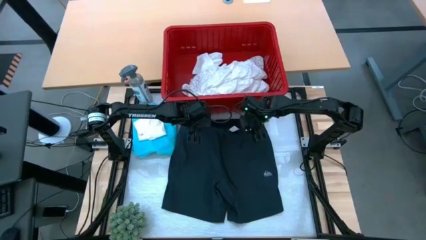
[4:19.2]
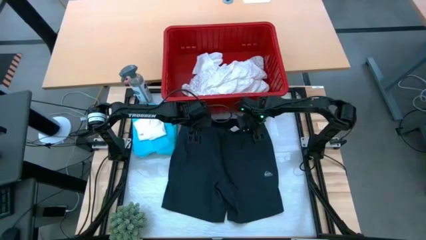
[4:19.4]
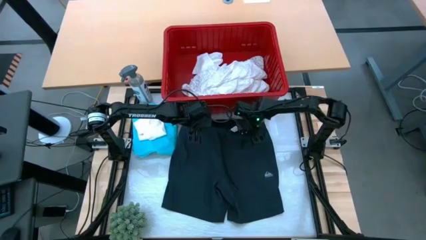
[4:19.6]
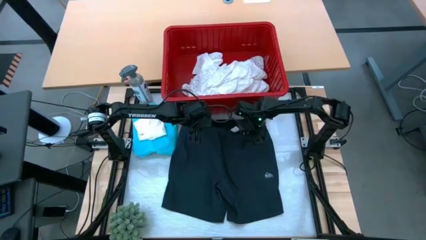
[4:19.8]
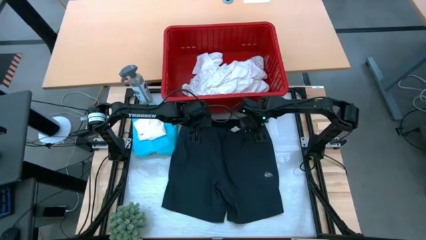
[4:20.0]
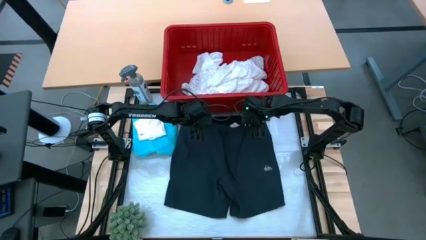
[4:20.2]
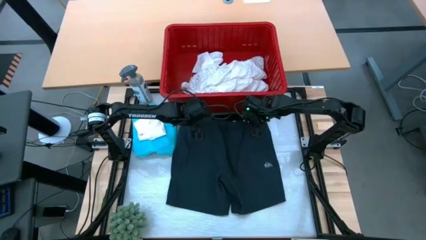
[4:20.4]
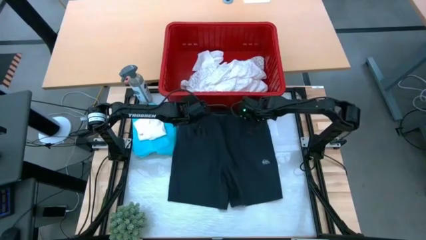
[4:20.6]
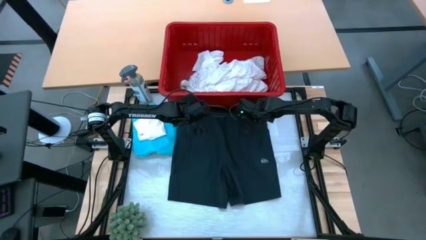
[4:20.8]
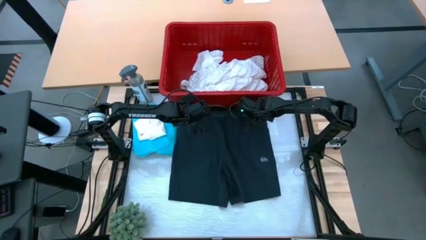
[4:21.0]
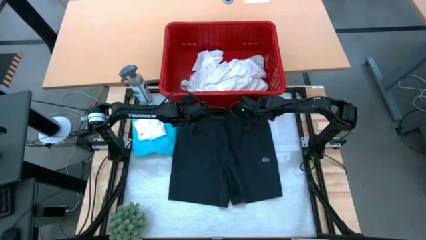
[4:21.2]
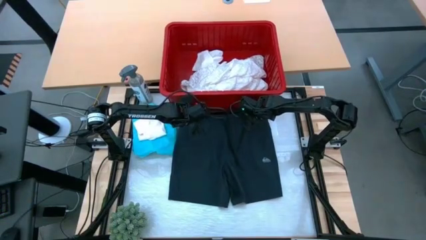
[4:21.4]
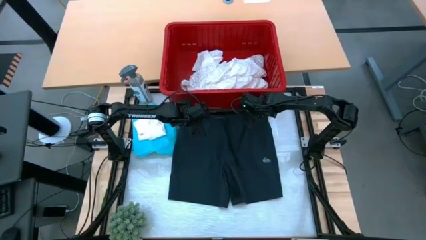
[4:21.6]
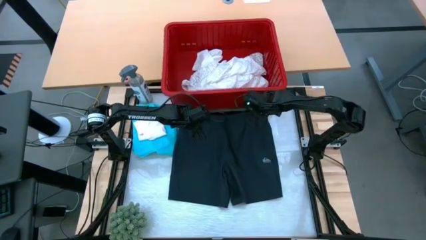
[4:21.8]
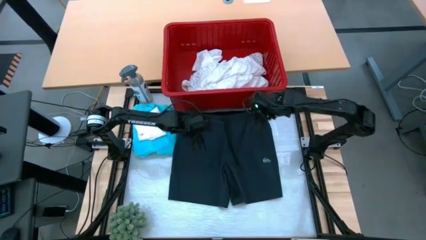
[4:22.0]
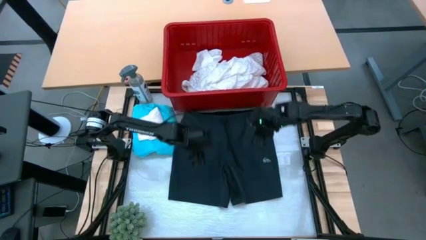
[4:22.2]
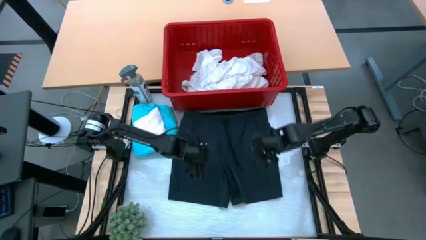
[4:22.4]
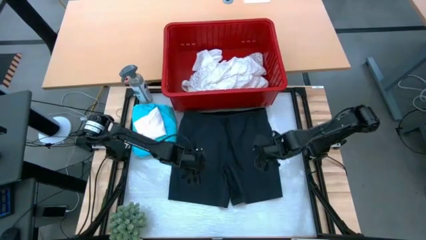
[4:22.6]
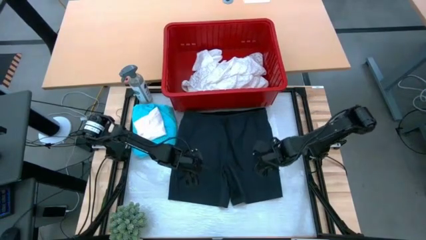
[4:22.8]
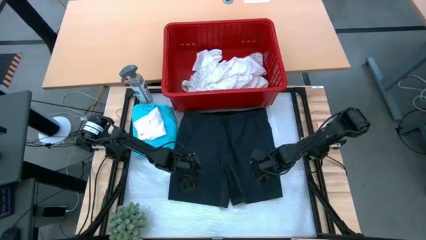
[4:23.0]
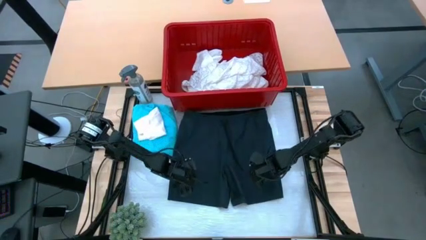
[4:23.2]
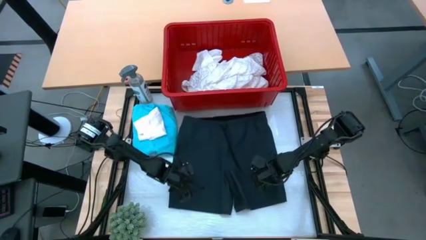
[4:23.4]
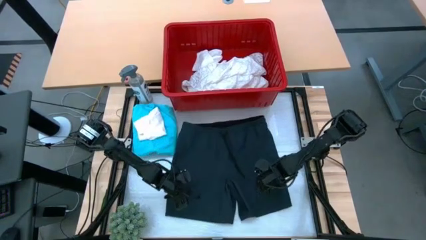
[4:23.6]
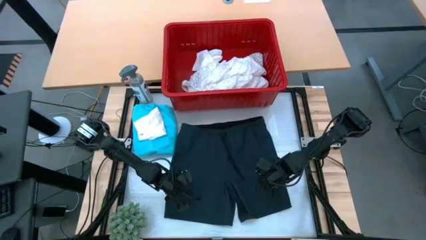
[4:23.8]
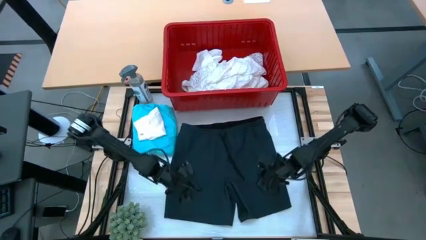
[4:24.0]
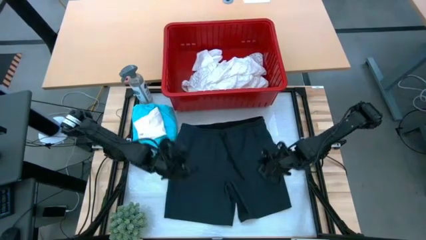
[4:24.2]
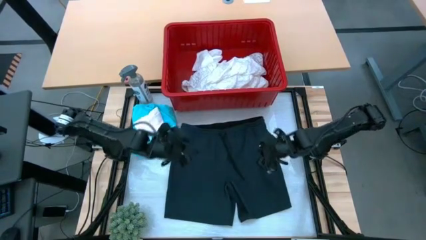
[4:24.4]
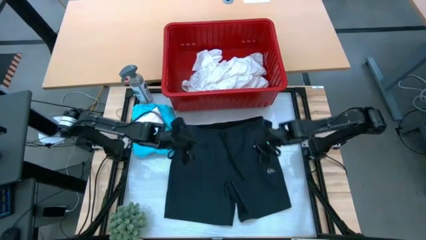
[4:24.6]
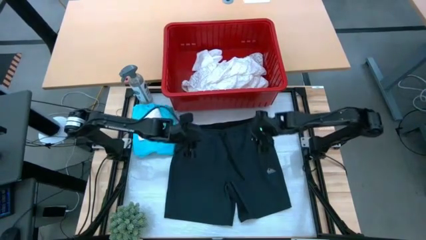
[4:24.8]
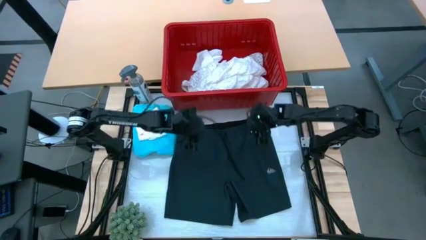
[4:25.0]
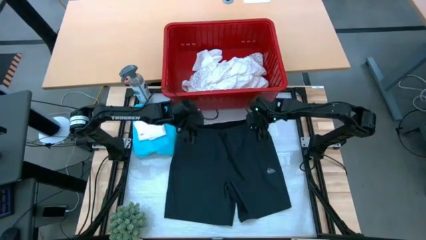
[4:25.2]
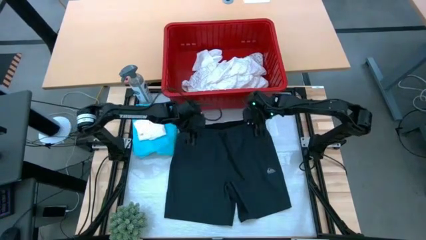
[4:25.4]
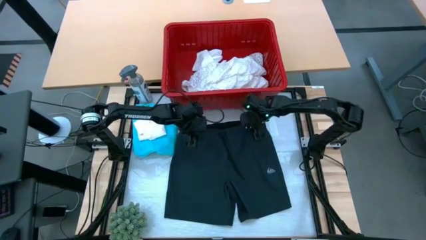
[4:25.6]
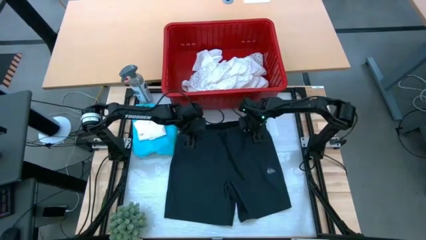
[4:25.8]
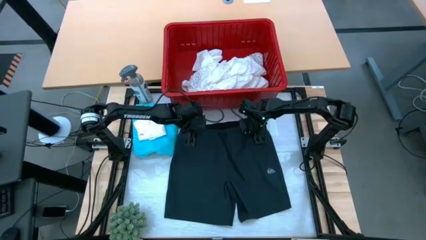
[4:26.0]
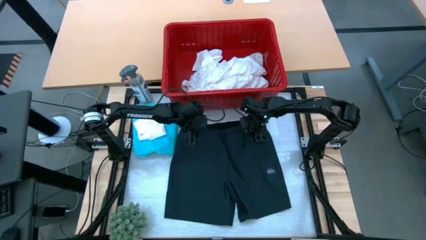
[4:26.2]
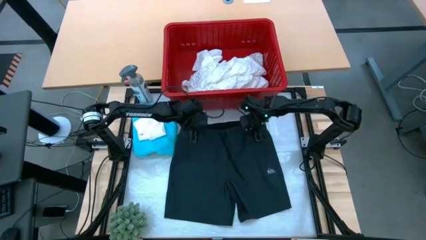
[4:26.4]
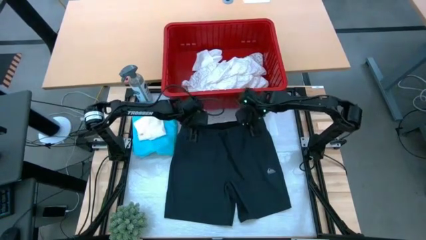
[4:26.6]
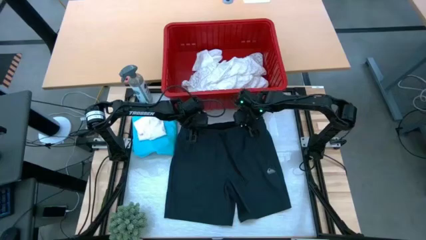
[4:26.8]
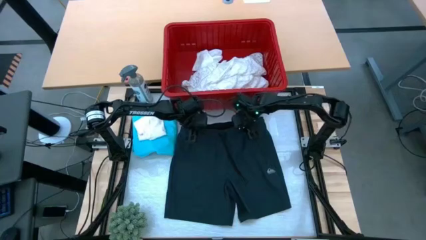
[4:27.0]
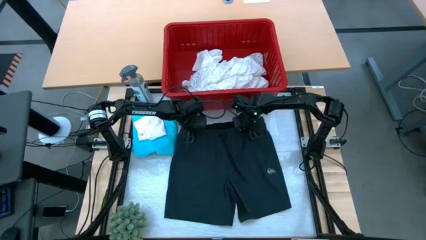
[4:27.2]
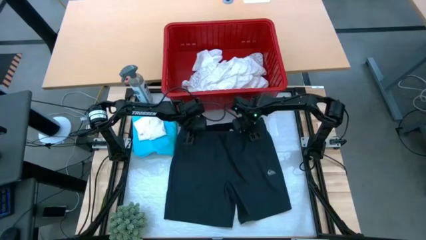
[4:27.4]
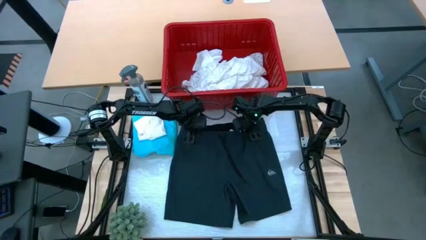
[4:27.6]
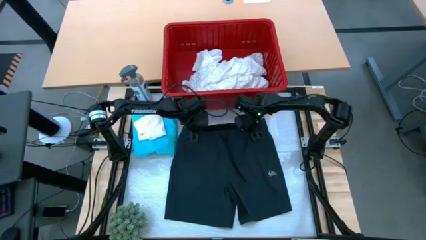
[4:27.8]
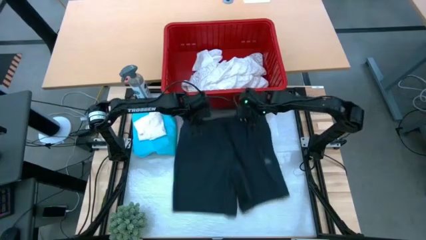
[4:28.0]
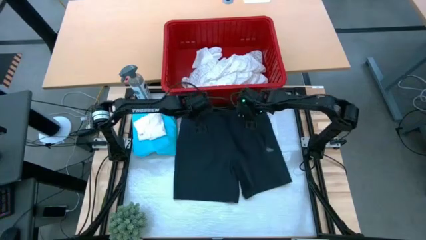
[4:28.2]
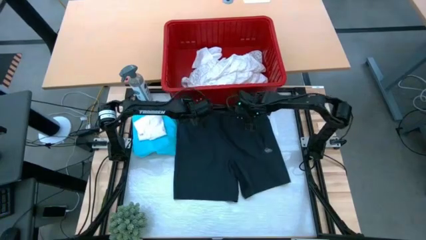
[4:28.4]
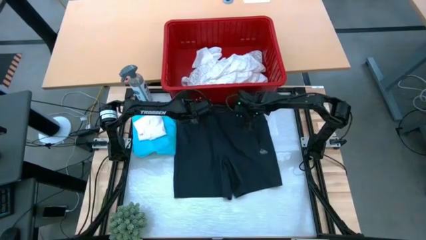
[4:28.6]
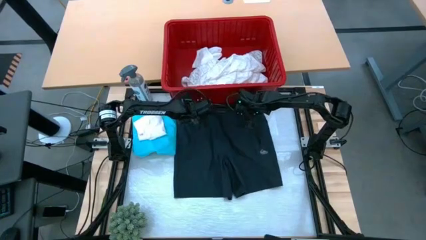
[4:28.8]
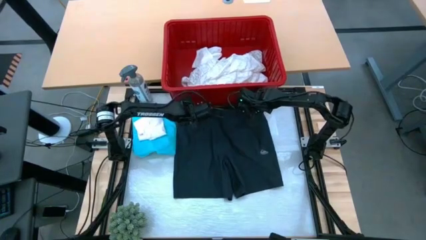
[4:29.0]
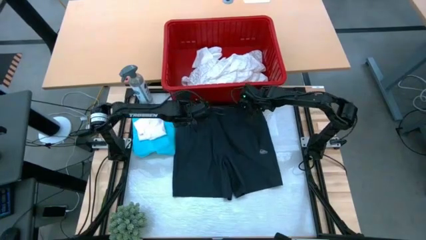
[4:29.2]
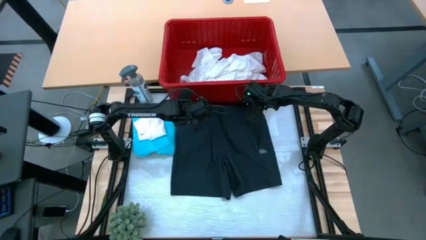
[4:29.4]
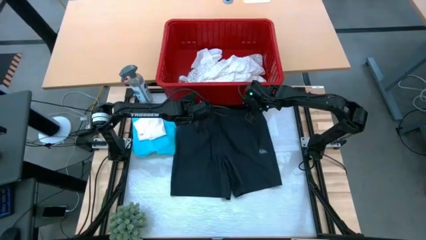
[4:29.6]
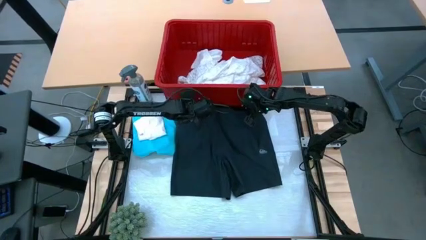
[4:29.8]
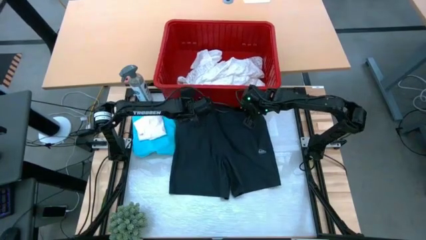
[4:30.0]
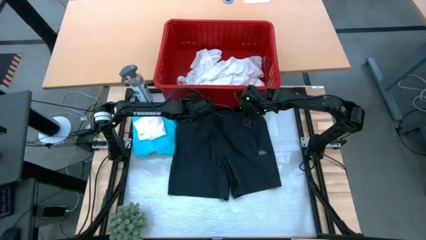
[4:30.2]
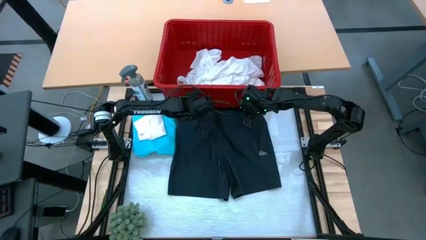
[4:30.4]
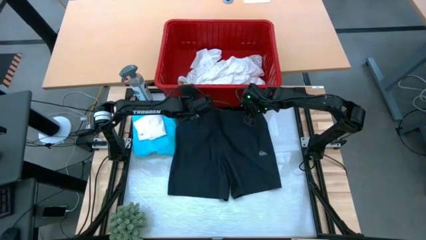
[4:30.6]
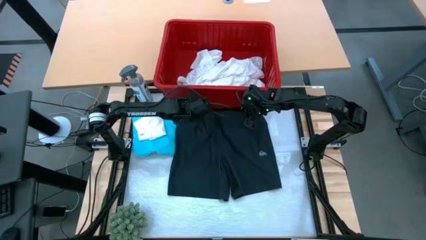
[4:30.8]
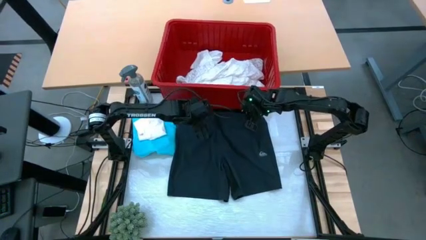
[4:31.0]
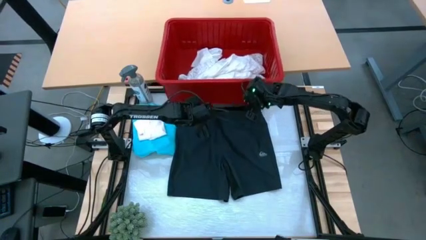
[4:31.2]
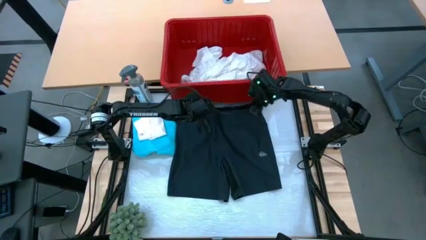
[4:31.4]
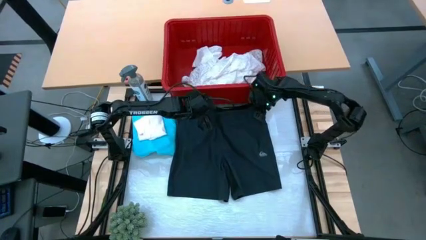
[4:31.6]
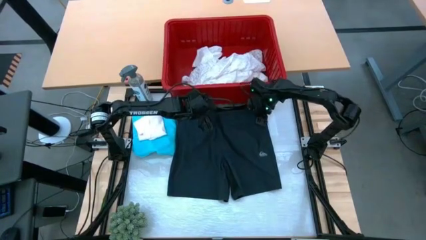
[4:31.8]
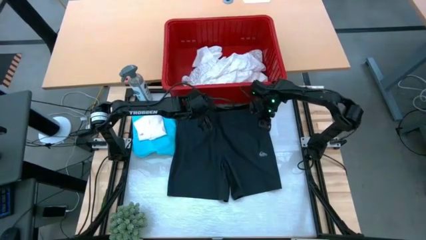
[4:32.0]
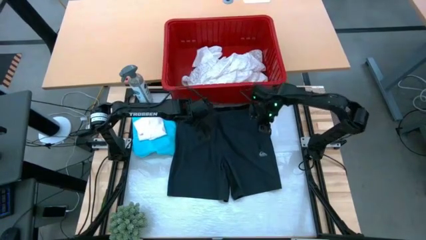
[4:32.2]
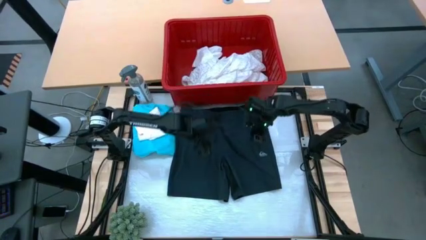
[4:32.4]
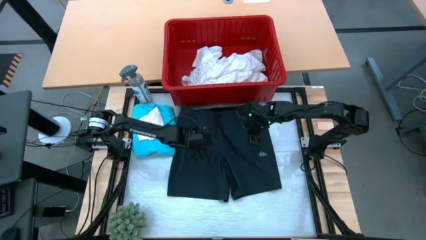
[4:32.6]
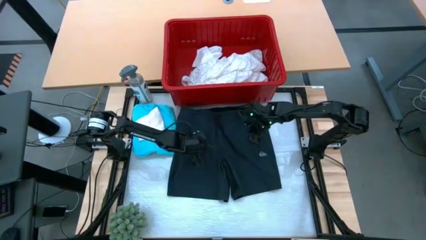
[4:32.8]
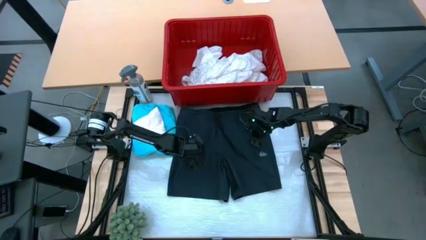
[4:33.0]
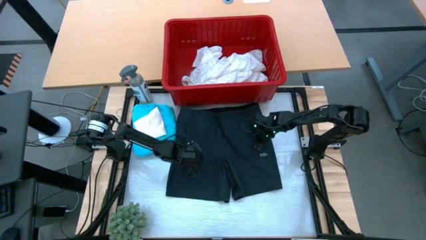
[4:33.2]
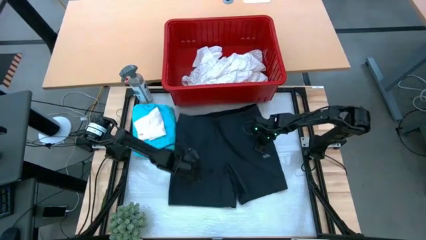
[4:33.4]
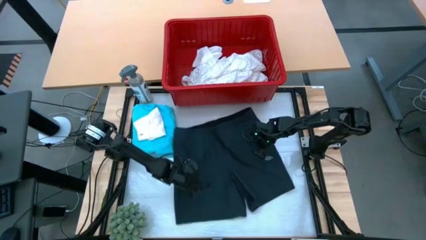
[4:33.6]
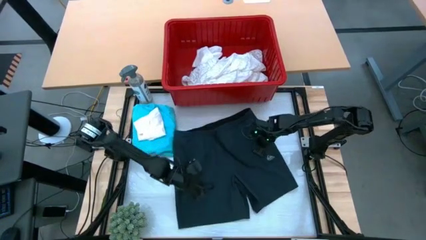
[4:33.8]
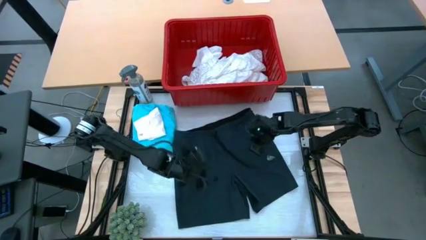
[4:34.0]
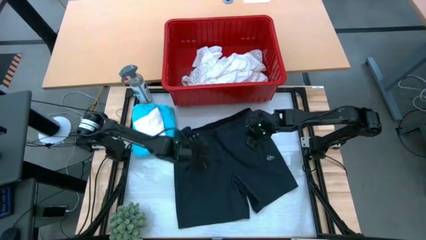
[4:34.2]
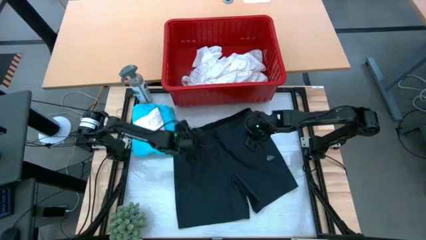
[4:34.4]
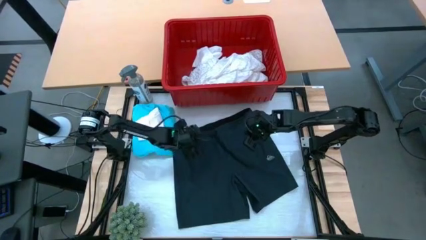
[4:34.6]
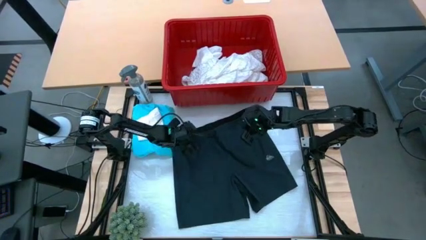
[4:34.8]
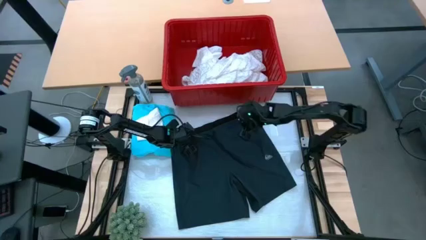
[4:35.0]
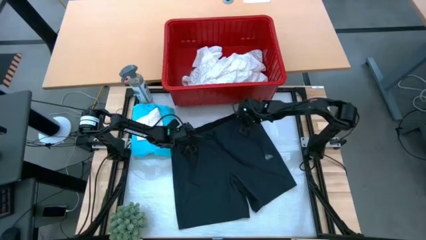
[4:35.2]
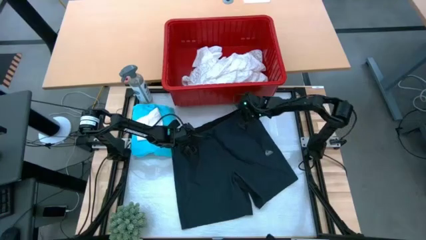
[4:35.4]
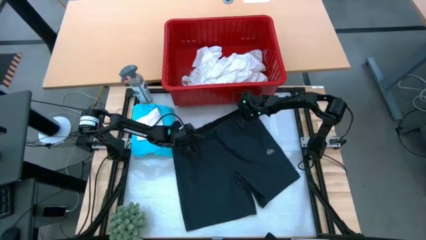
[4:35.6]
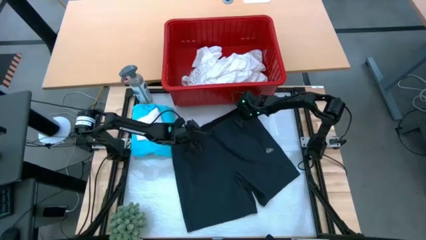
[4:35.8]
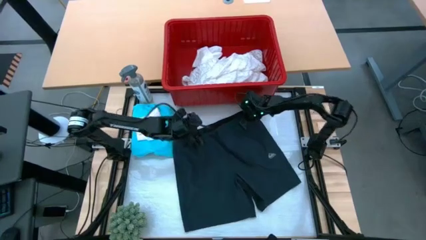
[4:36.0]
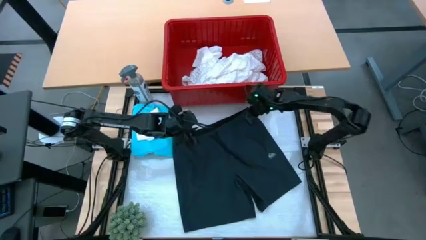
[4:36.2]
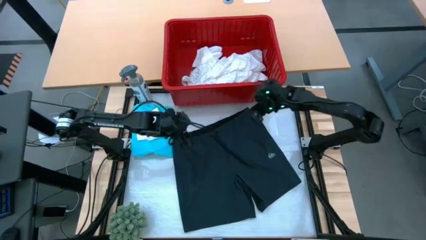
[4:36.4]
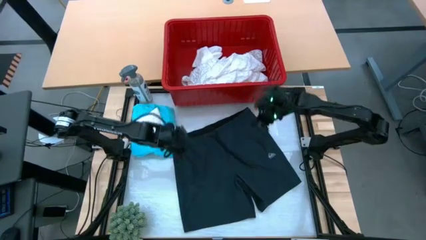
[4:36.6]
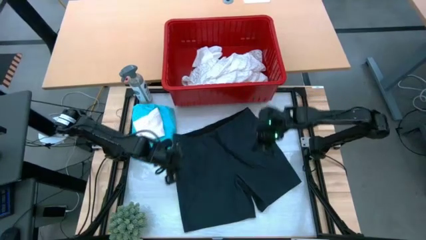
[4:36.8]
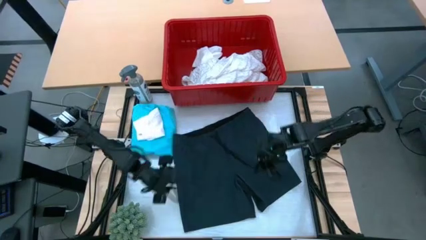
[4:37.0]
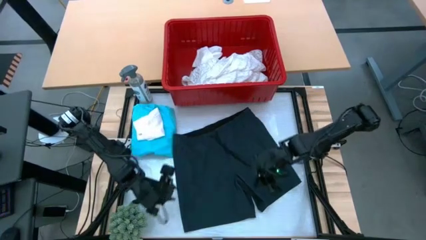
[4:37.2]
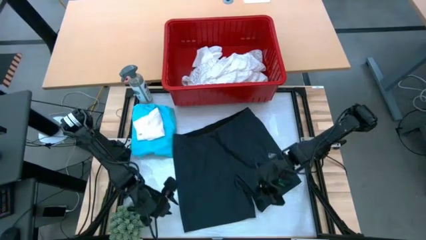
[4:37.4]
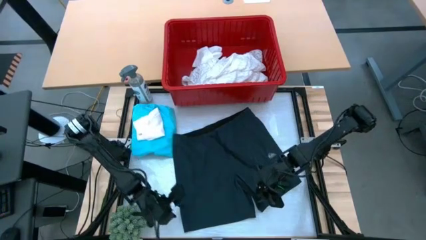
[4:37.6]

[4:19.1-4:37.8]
Task: Fold laundry
Fold the black shorts
